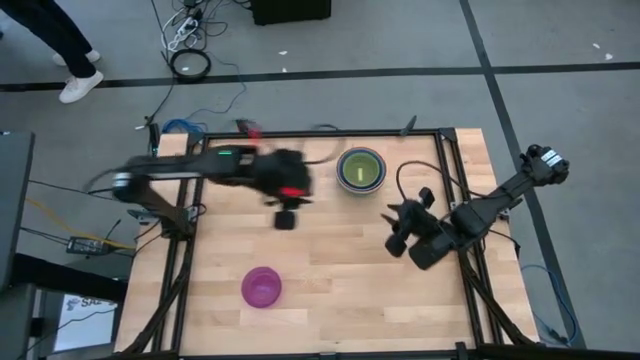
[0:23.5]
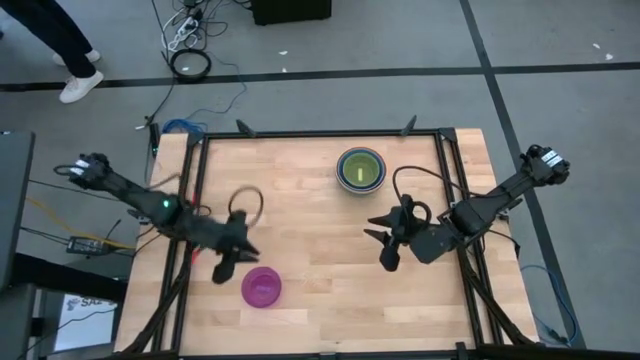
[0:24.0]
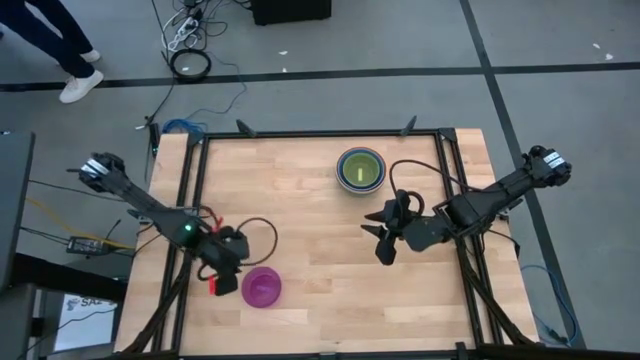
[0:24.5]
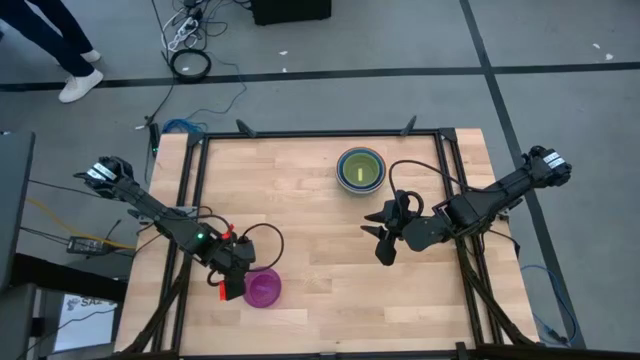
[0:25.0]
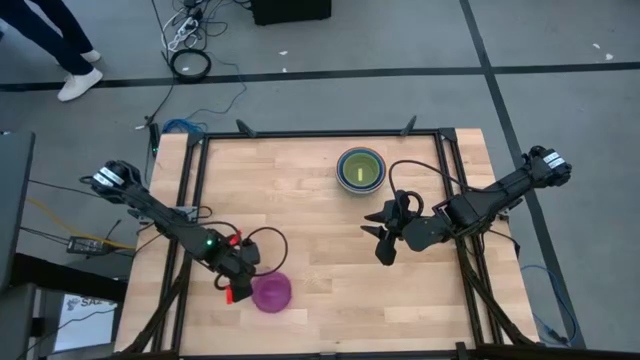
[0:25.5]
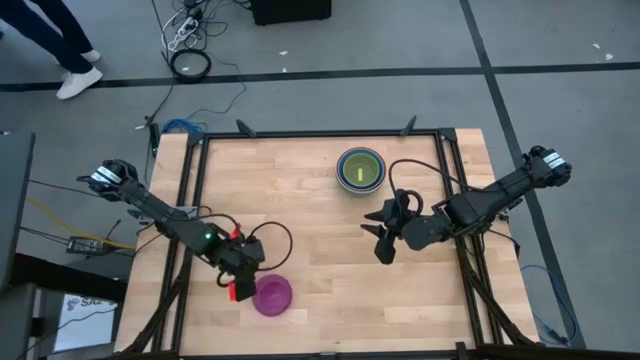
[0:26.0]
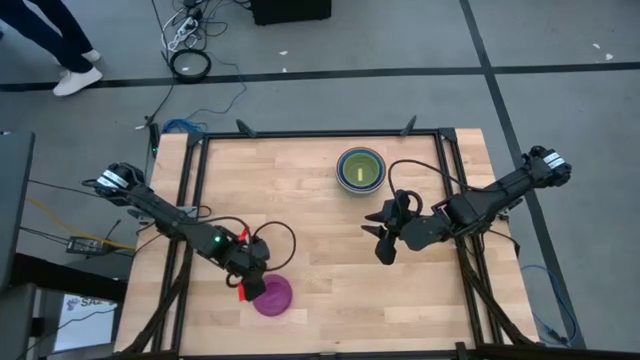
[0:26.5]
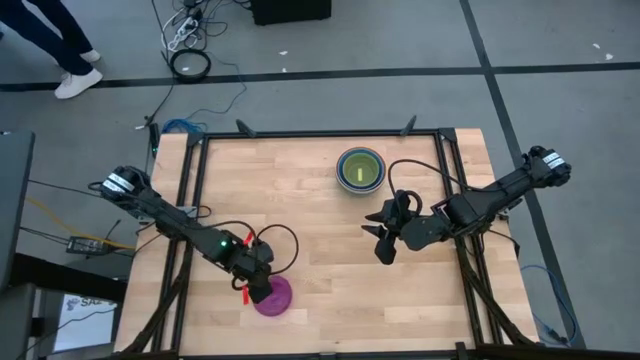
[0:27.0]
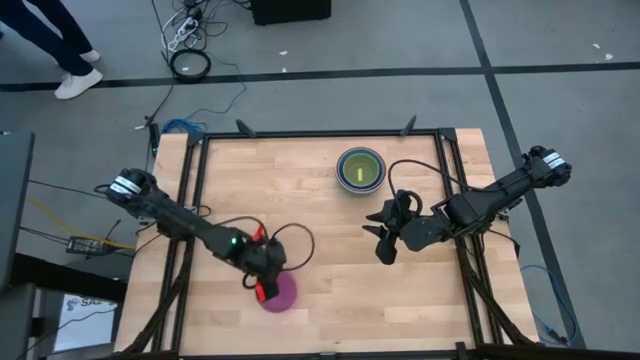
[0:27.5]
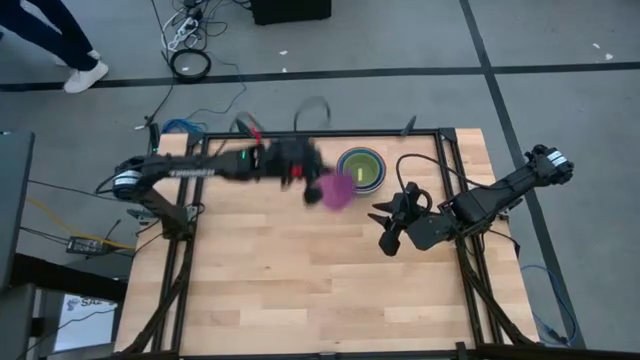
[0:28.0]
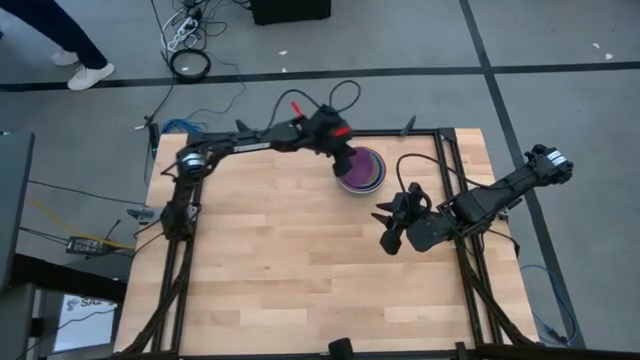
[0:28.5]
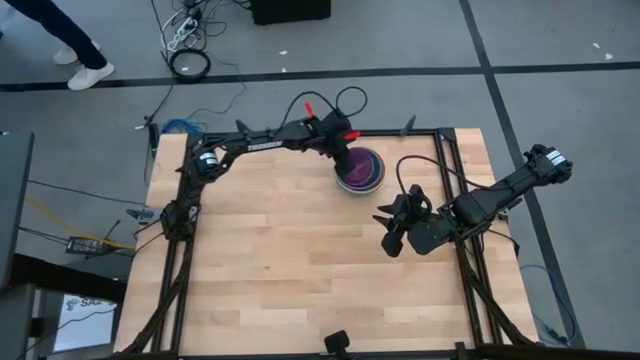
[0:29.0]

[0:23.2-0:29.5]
Stack the purple bowl into the yellow bowl

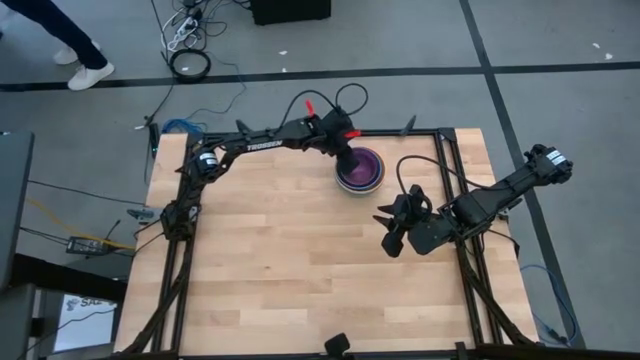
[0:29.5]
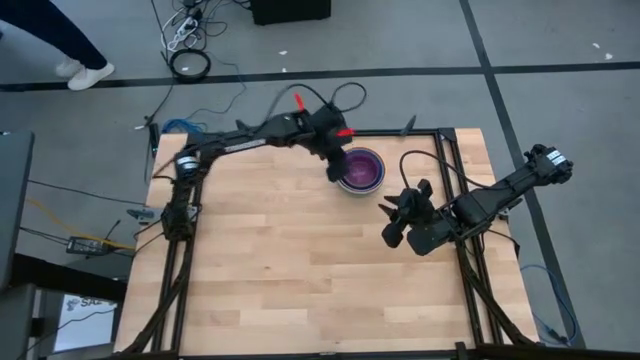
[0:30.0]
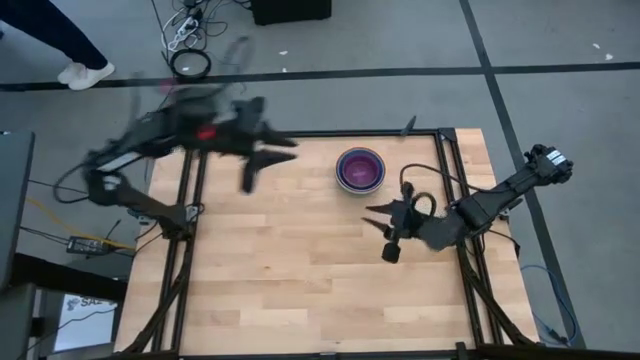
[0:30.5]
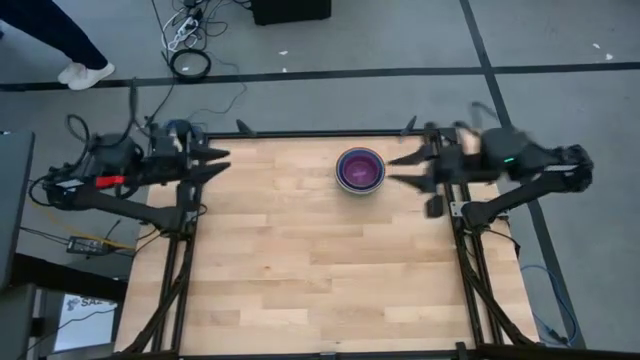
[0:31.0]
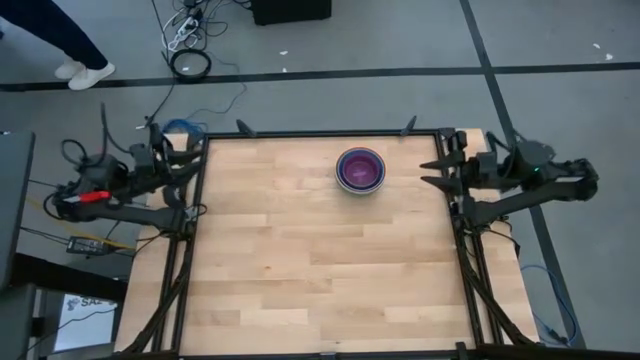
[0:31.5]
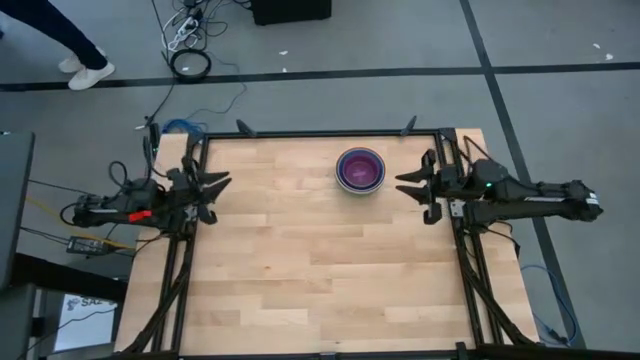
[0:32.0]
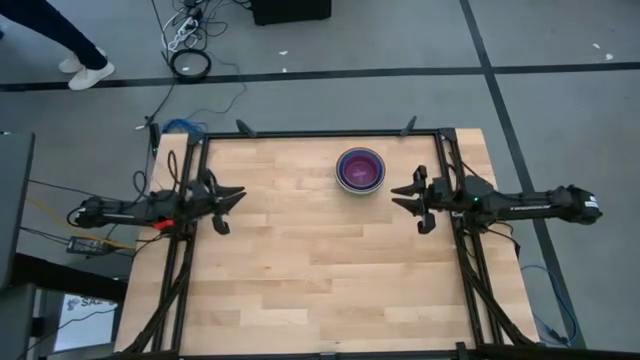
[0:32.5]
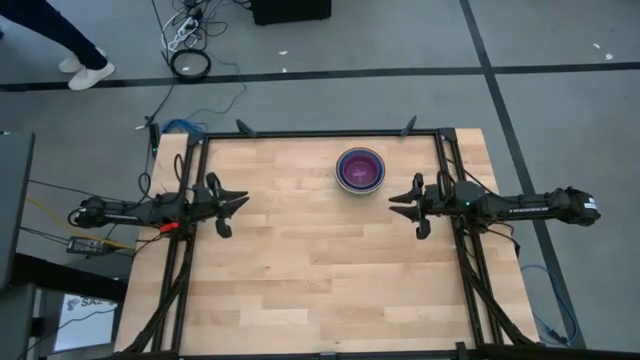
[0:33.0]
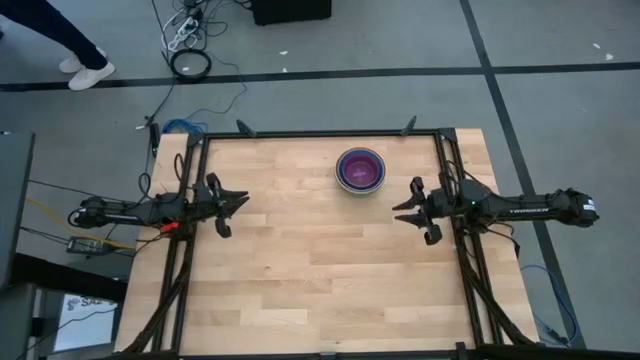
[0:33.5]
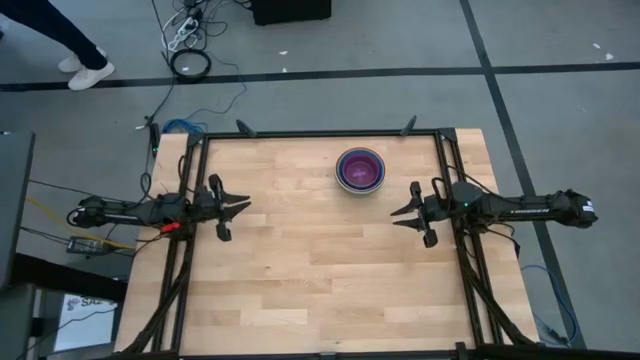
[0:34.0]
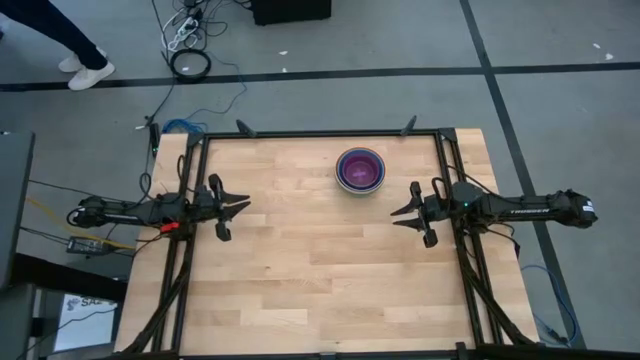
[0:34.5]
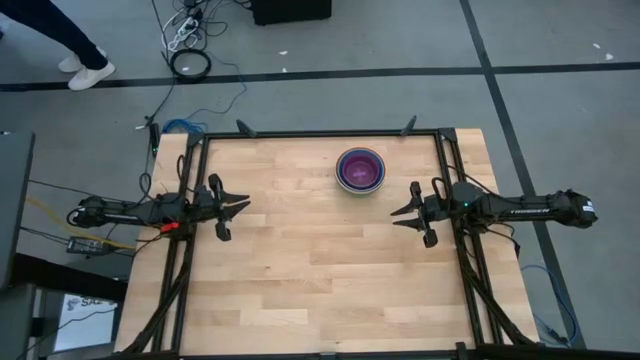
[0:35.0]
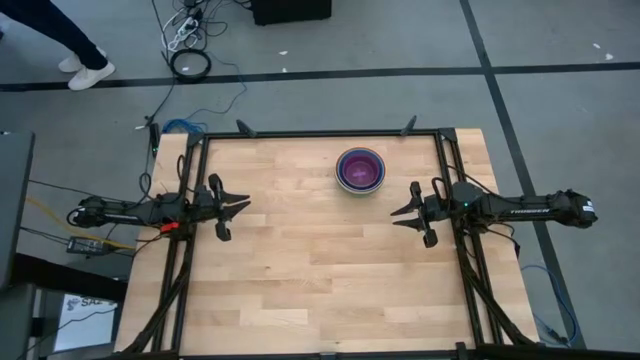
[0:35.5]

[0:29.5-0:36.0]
Return to Home Position

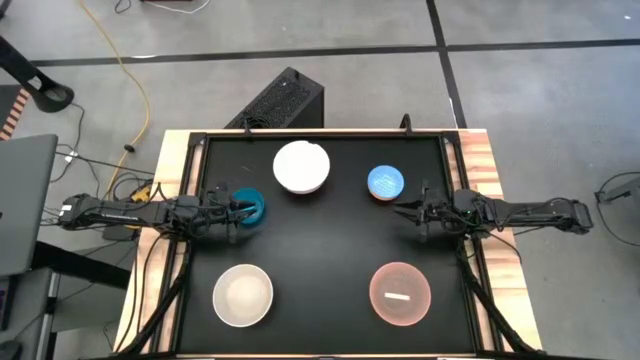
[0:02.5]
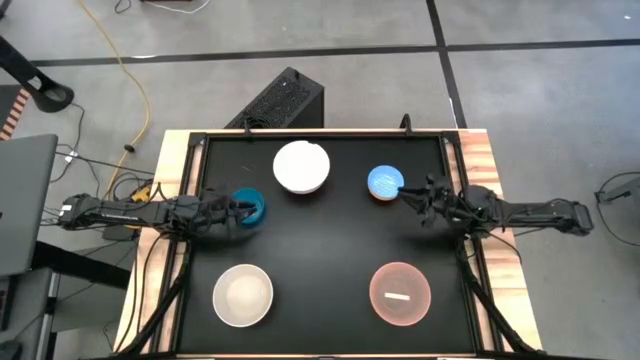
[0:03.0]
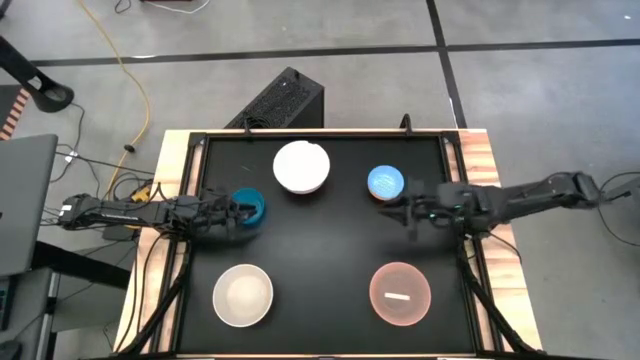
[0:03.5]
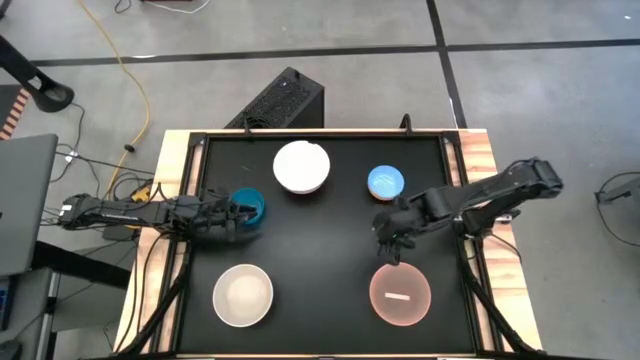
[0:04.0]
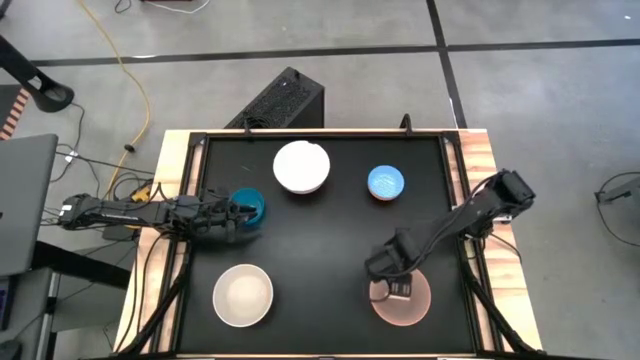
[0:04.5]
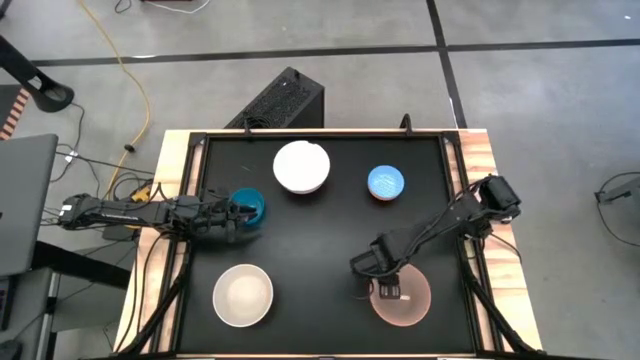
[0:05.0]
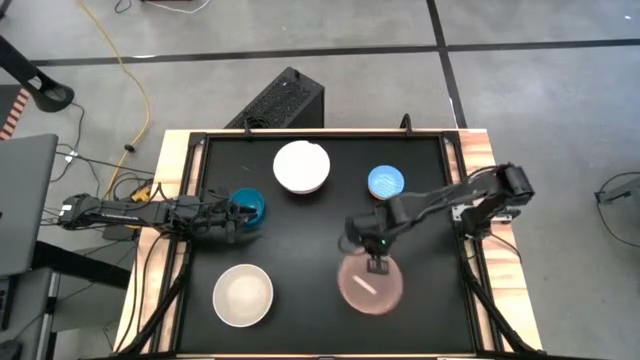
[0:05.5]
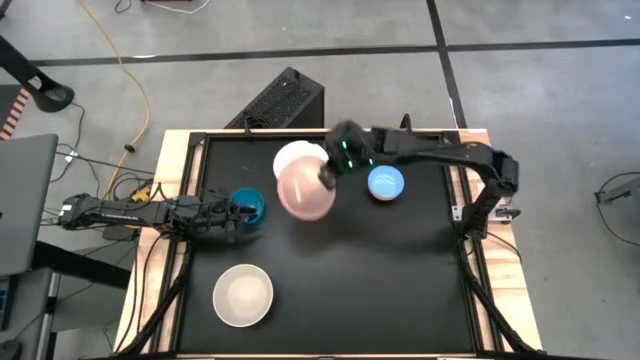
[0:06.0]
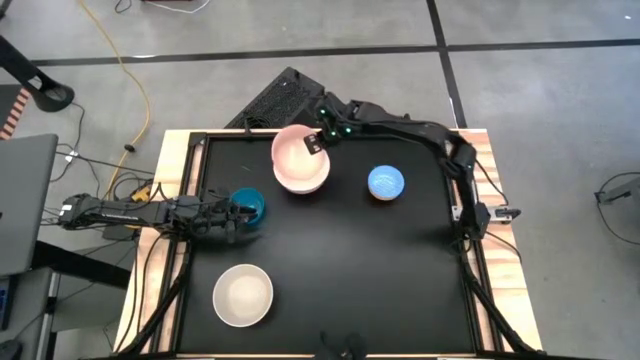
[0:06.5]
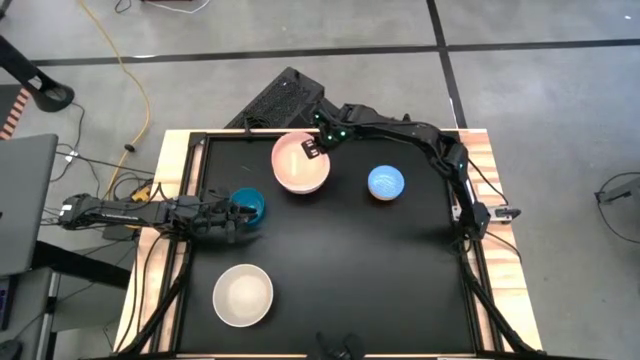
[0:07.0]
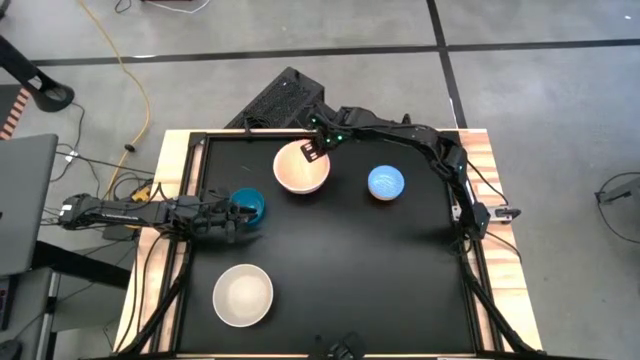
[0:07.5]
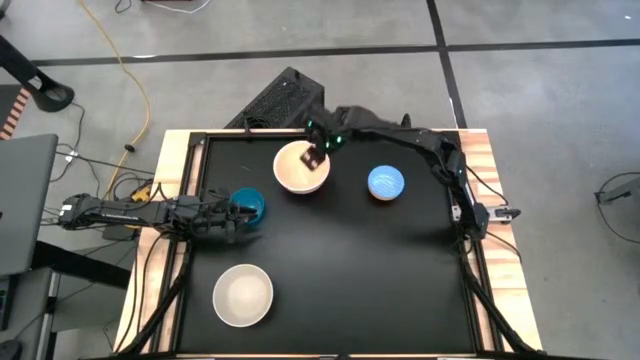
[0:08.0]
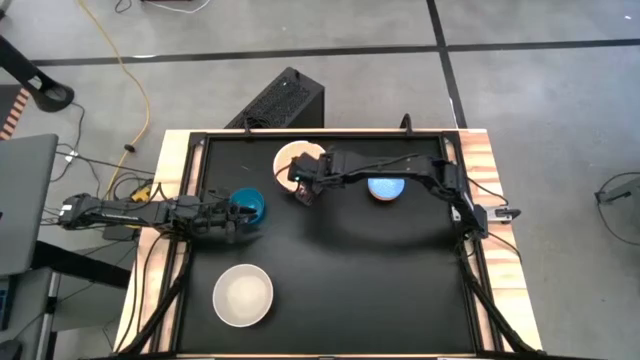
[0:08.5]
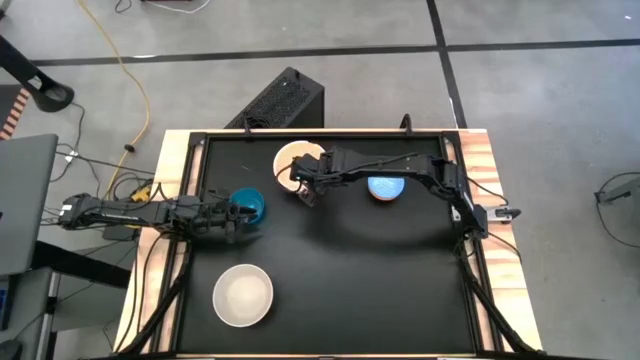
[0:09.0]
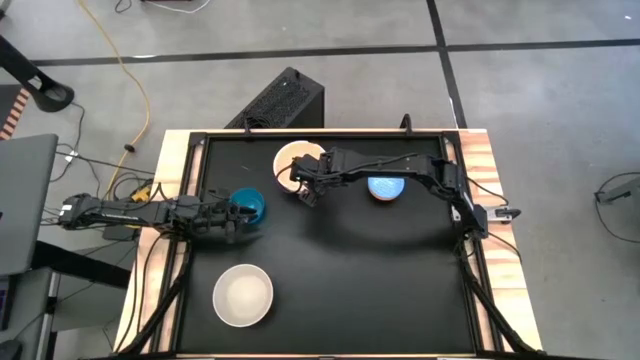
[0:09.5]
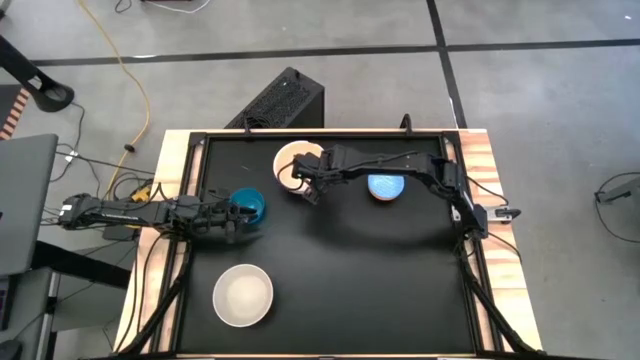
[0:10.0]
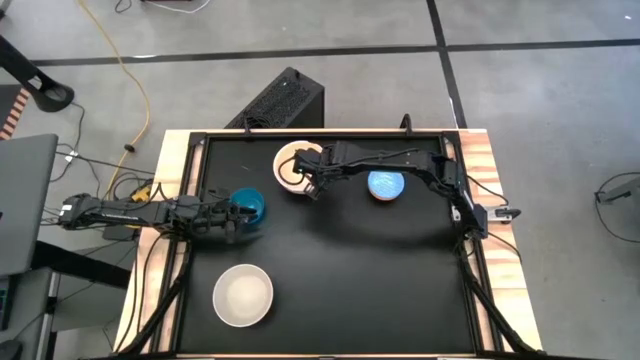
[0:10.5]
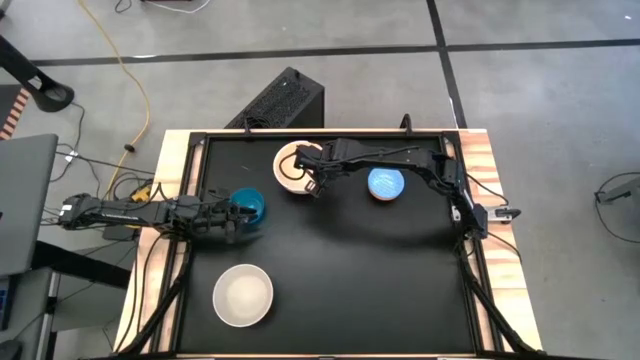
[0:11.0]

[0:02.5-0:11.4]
Stack the light orange bowl on top of the light purple bowl
